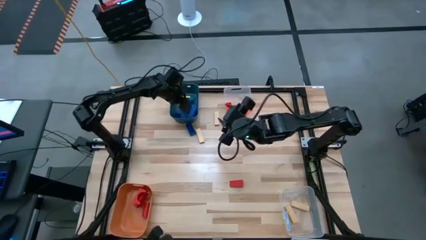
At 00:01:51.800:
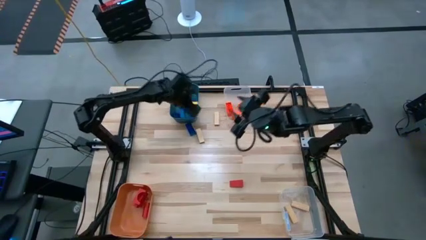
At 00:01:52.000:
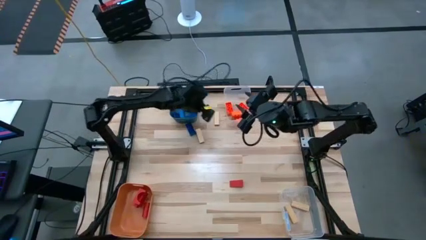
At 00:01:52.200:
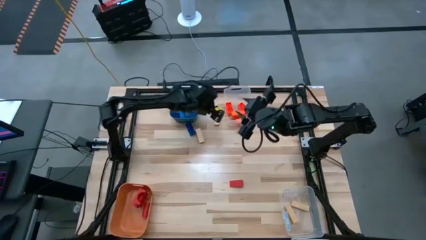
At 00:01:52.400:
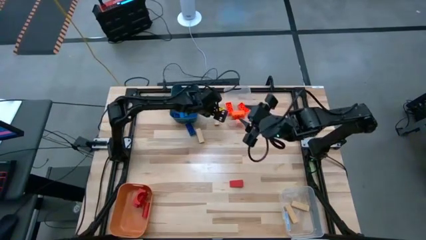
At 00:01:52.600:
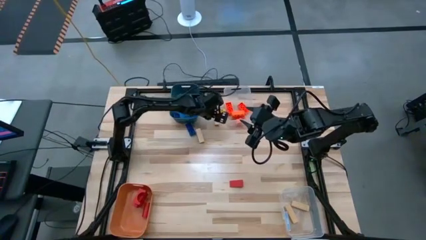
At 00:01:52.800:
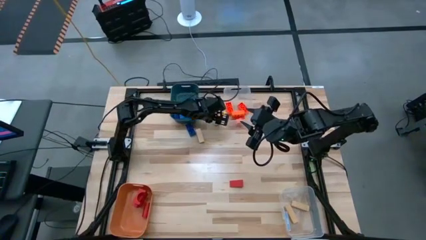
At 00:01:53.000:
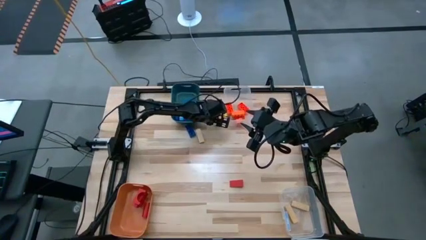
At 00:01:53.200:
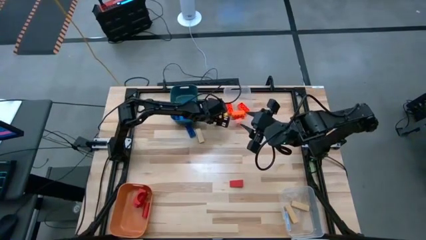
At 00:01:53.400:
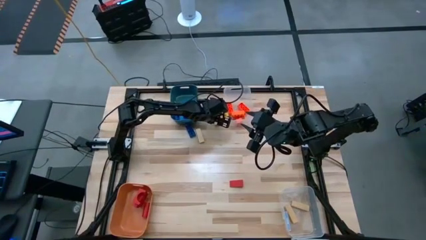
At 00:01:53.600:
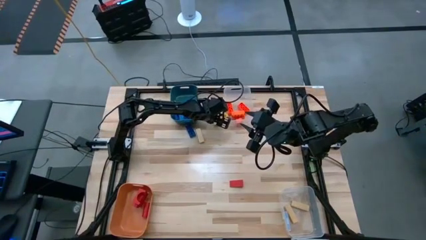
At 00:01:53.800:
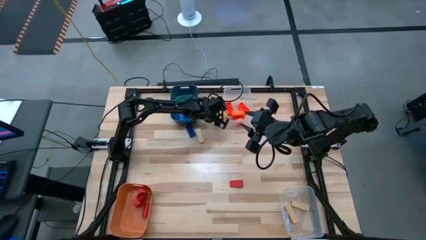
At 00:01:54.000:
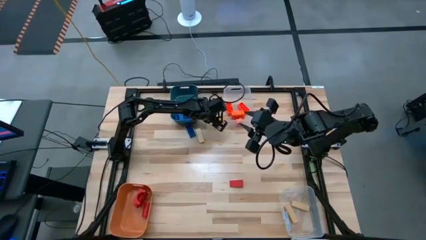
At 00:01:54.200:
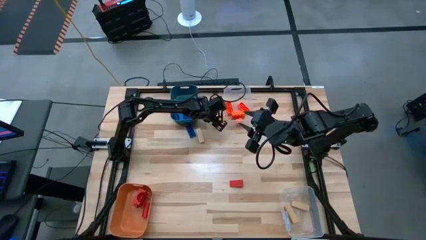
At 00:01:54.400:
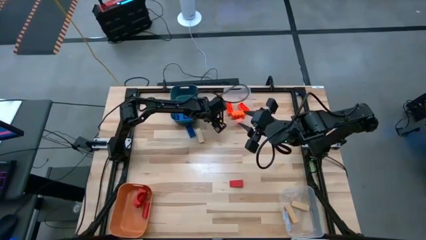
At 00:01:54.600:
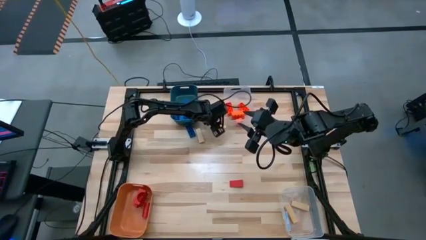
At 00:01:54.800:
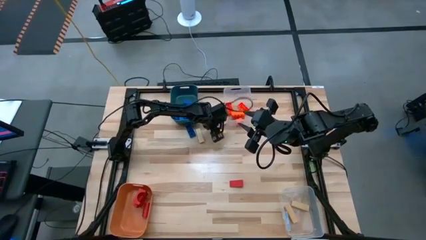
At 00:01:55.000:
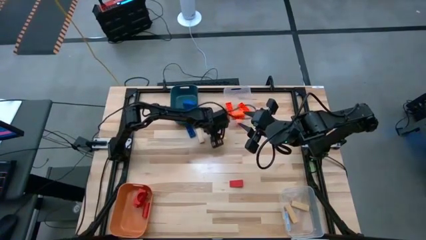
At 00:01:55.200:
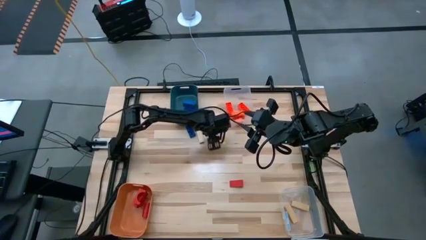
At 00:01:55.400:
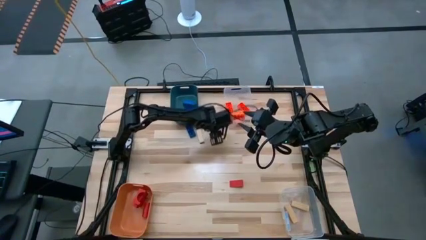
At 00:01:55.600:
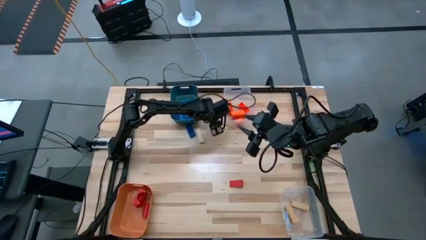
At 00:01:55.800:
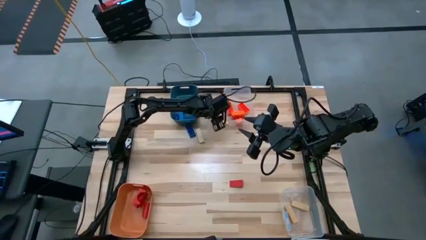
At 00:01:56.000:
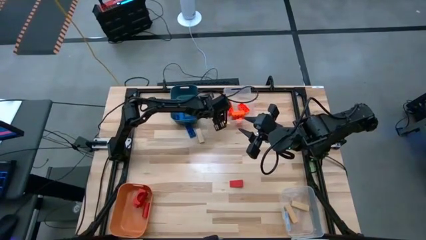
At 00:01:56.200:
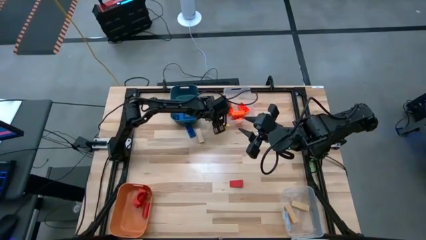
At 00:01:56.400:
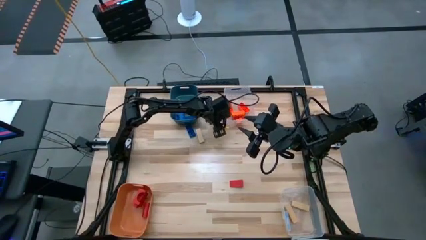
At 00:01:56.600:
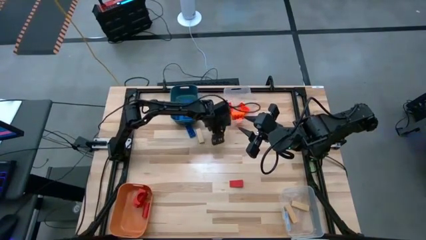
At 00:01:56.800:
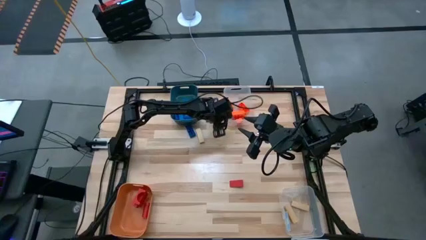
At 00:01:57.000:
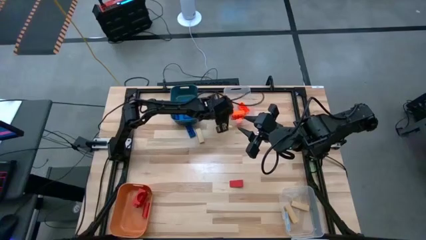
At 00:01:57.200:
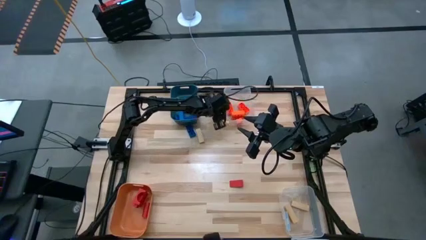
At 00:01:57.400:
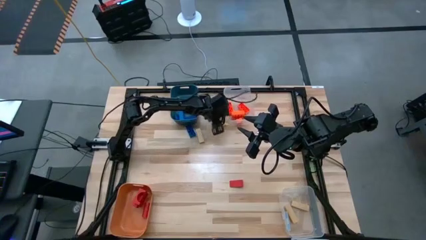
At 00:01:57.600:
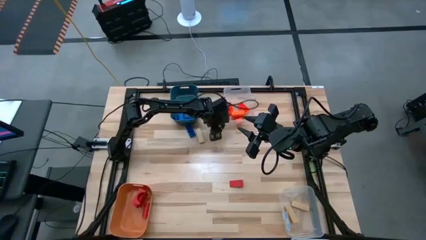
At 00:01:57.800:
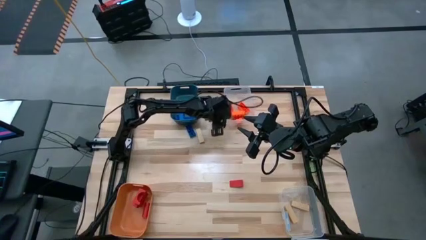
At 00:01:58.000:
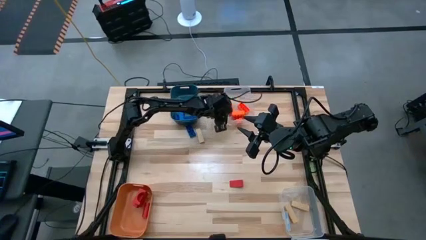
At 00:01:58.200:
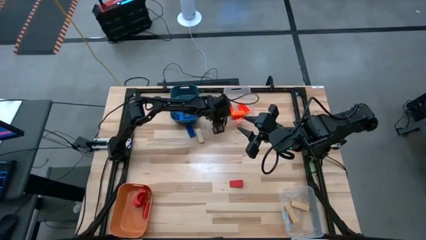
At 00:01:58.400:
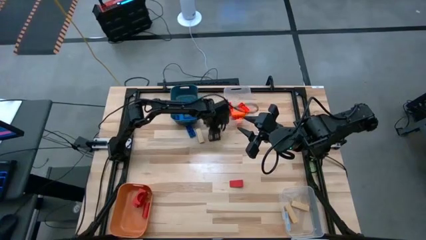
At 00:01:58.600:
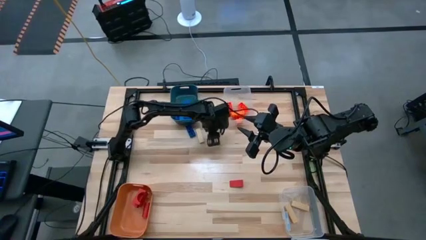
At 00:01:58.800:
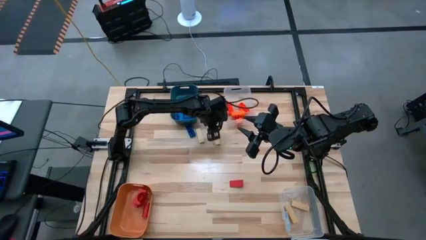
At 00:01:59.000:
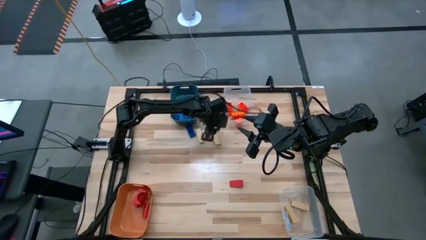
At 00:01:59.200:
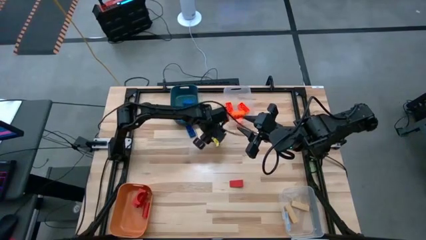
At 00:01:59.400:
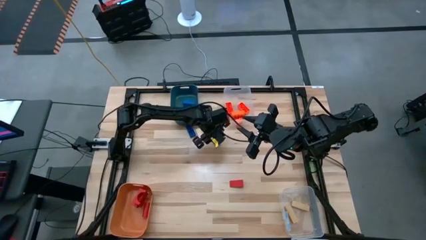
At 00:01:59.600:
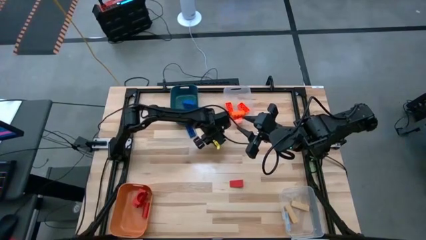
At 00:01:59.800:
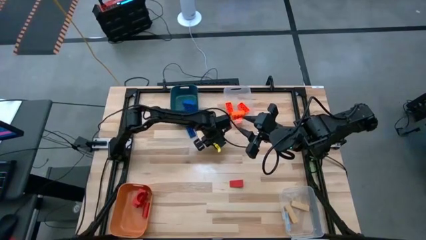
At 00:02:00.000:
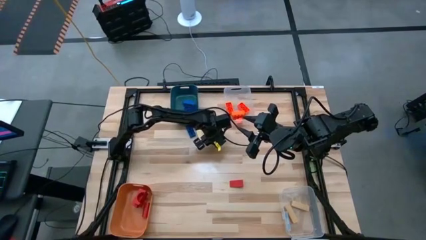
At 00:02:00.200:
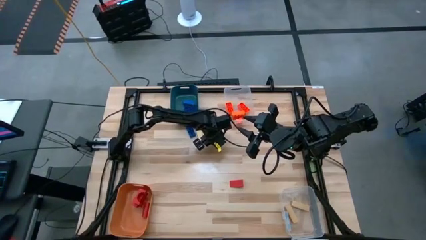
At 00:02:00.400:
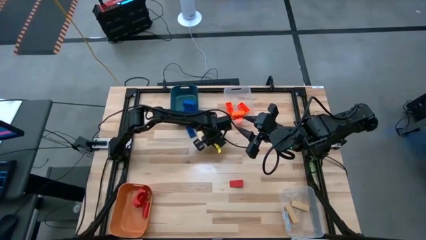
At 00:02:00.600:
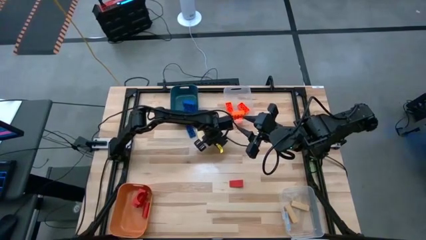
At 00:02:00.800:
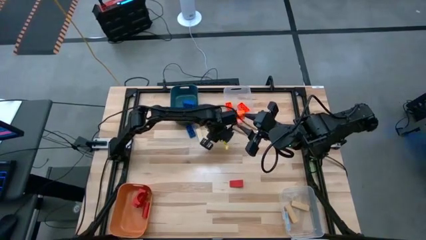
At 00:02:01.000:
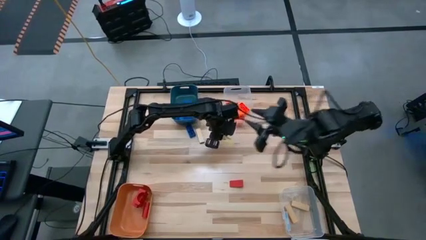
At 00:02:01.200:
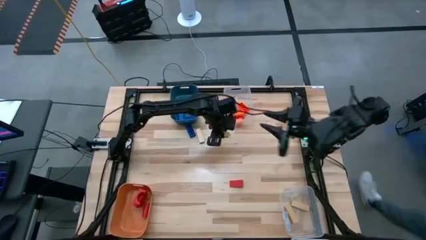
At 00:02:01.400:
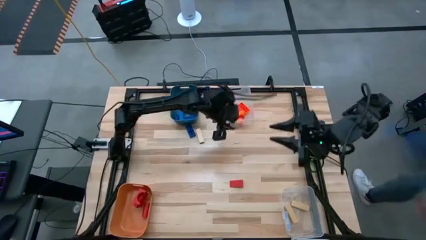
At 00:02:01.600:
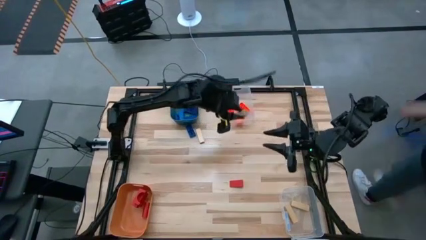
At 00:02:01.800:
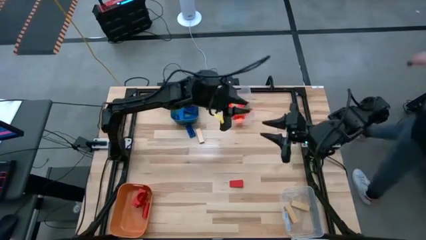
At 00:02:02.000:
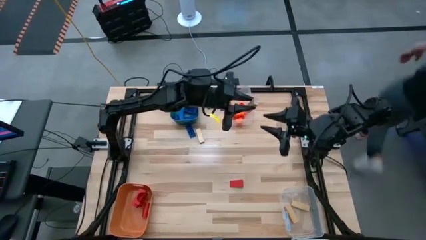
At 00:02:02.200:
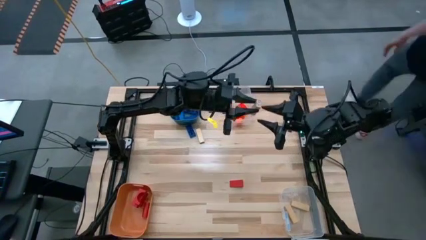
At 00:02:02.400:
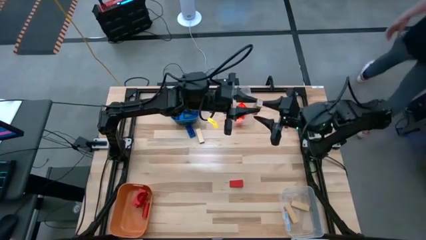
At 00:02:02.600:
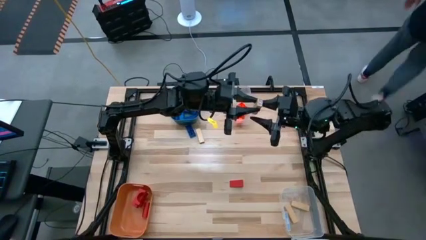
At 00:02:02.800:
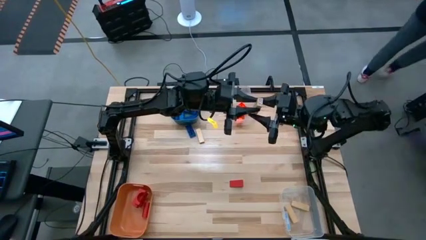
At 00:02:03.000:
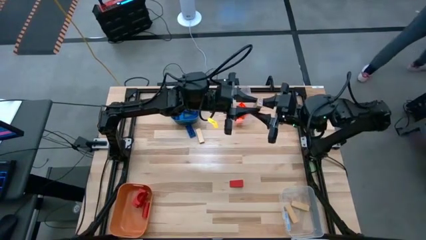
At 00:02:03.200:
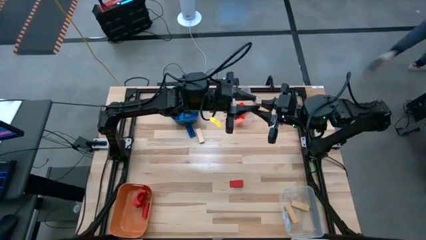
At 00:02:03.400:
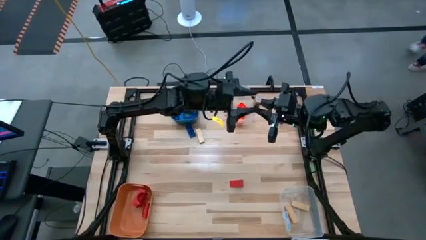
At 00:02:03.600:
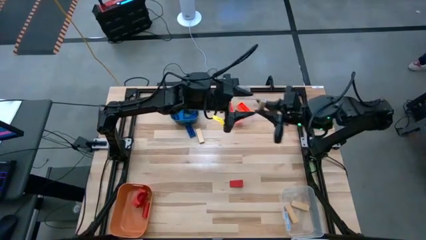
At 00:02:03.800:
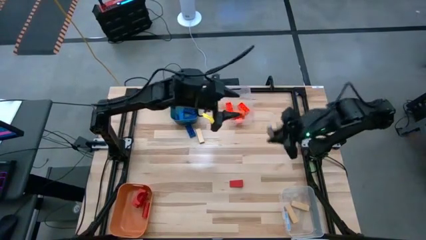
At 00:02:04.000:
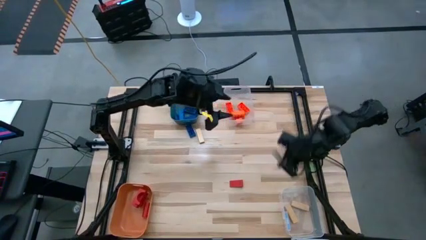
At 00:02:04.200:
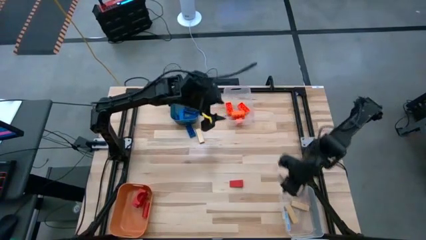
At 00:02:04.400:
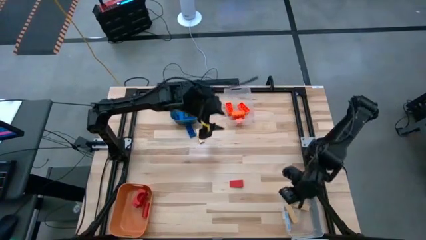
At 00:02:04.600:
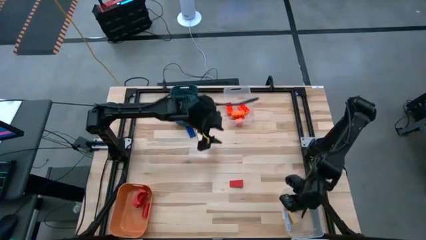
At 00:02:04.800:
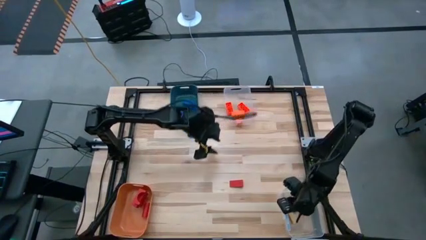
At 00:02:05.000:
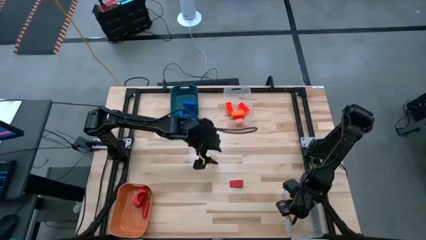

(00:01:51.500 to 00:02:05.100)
Task: Sort blocks
Put the brown block into the bottom transparent bin

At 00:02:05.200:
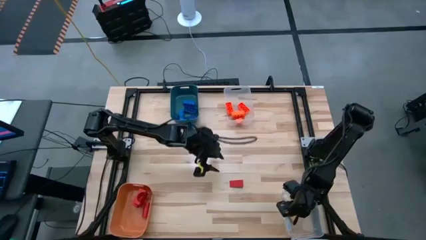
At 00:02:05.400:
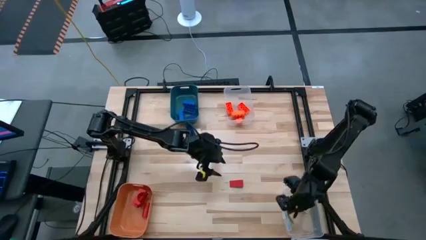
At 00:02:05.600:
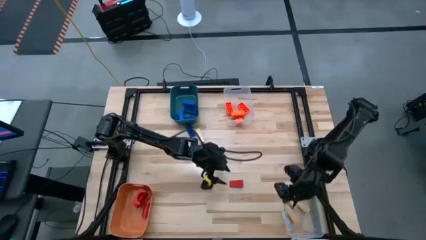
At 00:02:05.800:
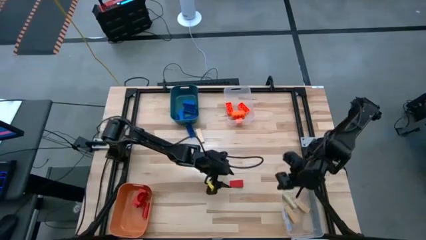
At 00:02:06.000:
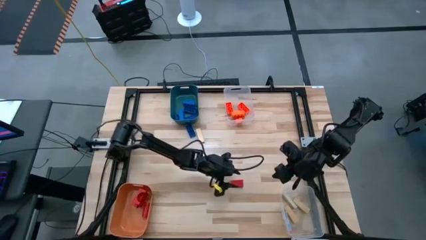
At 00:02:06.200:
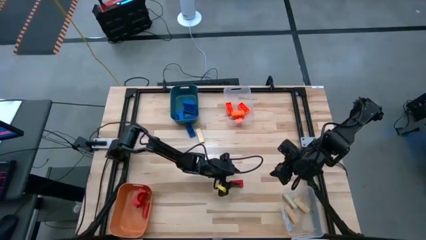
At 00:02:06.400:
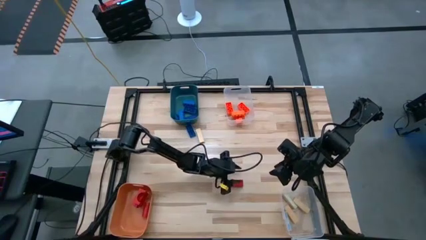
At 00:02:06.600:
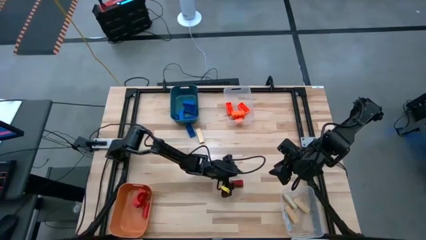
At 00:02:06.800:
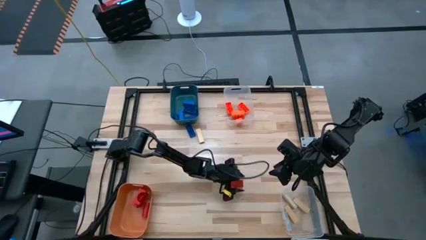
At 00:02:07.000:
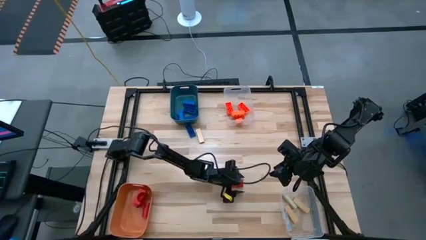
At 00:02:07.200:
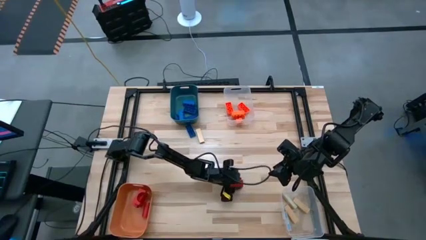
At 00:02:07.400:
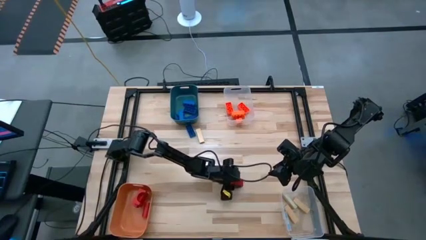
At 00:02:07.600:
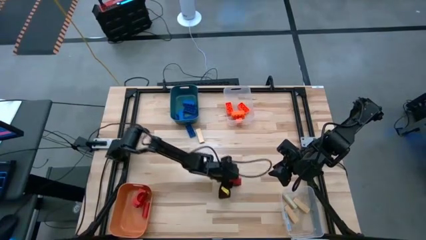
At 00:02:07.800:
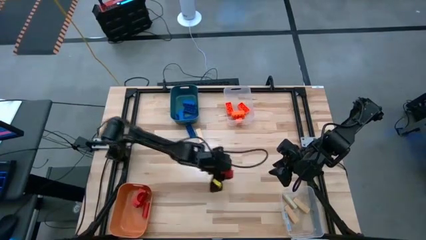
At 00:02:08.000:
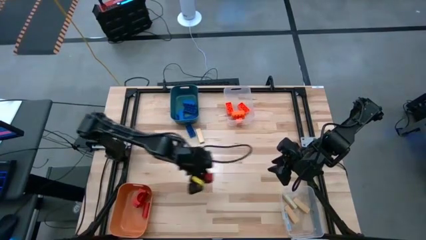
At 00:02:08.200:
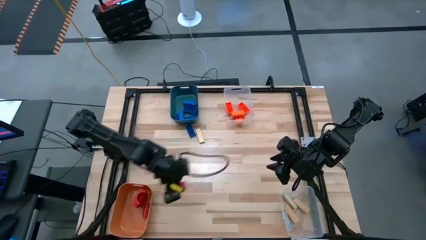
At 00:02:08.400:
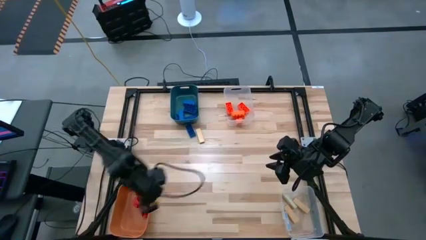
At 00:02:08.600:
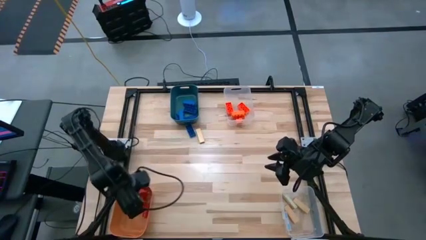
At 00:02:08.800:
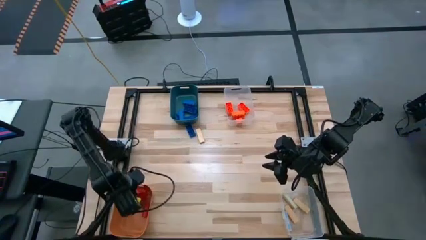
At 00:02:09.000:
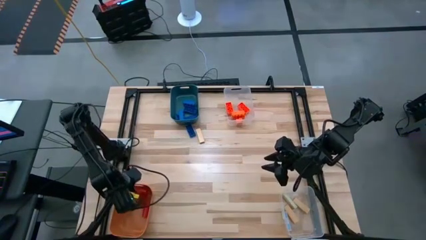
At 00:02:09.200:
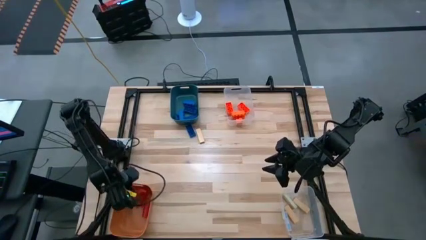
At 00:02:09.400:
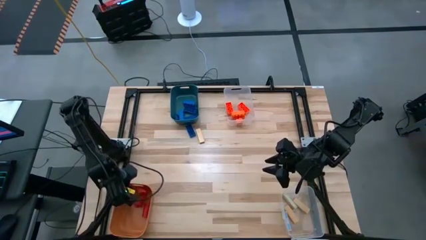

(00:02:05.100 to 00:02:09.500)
Put the red block into the orange bin
